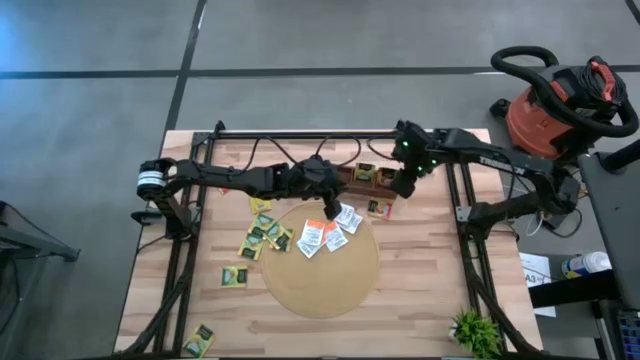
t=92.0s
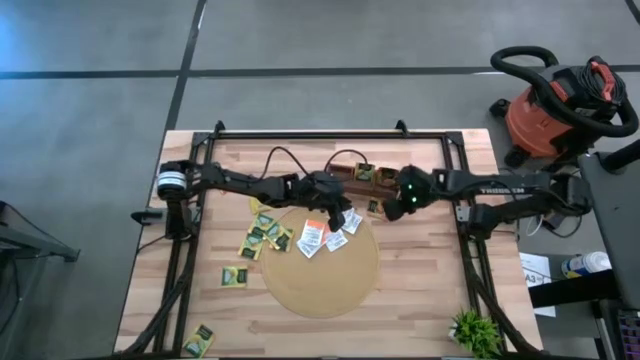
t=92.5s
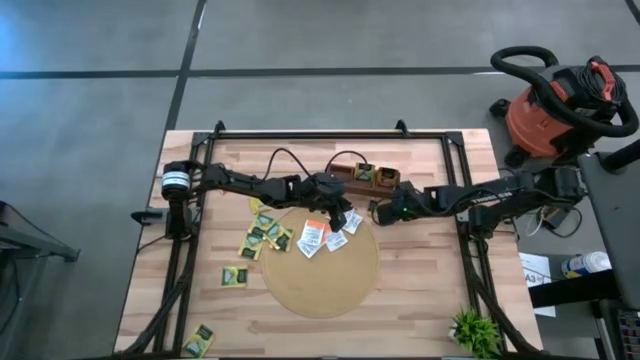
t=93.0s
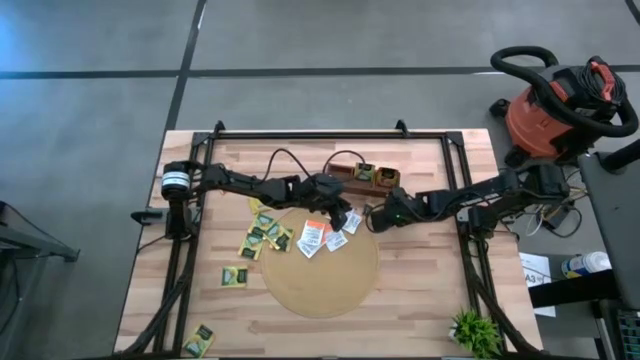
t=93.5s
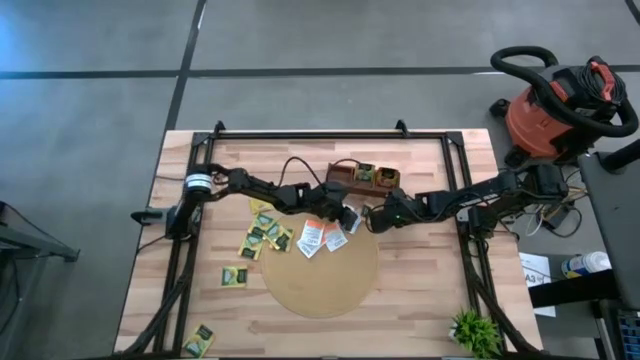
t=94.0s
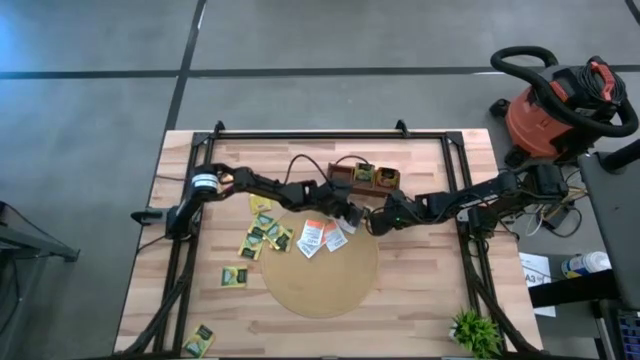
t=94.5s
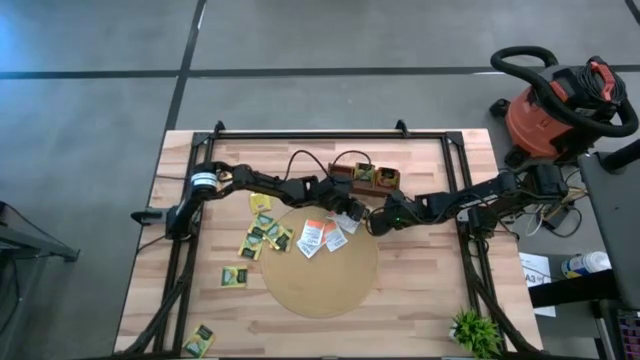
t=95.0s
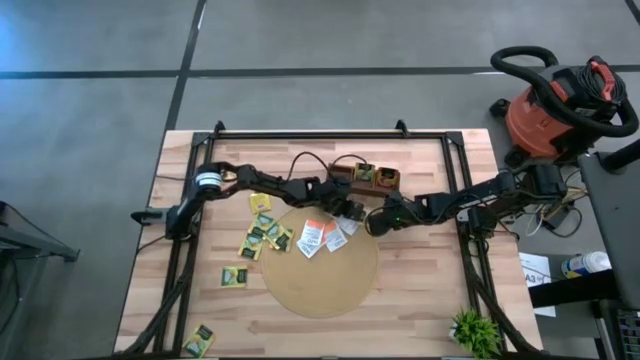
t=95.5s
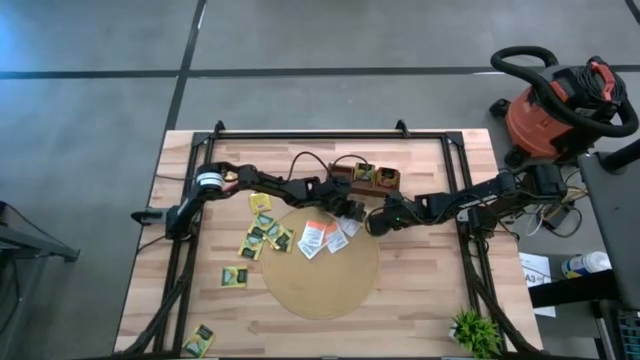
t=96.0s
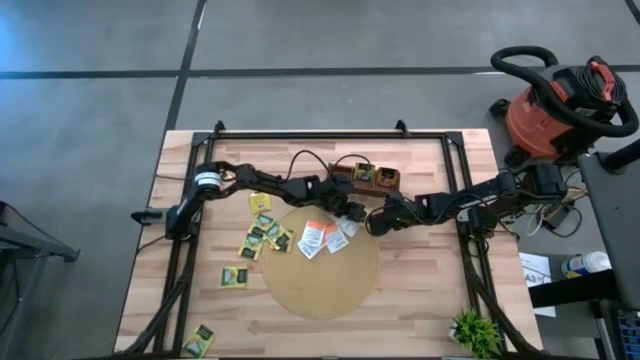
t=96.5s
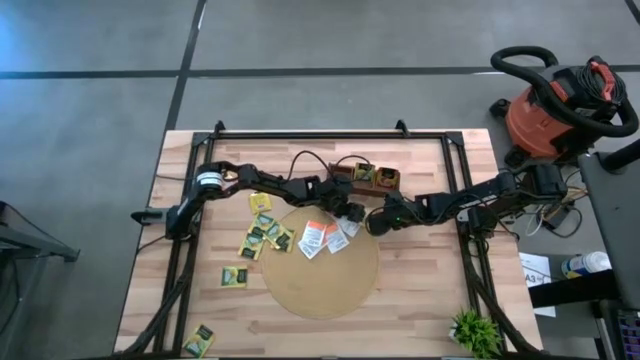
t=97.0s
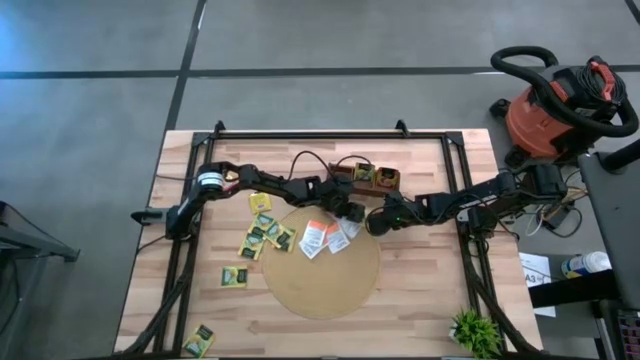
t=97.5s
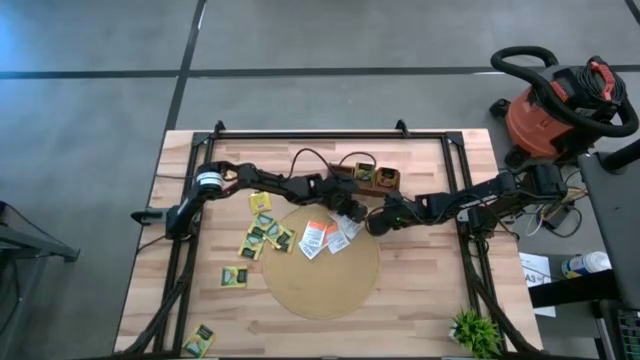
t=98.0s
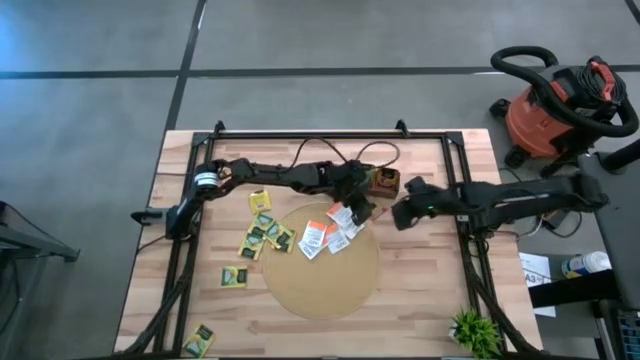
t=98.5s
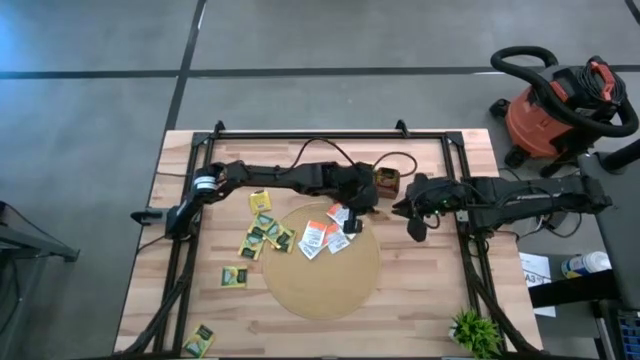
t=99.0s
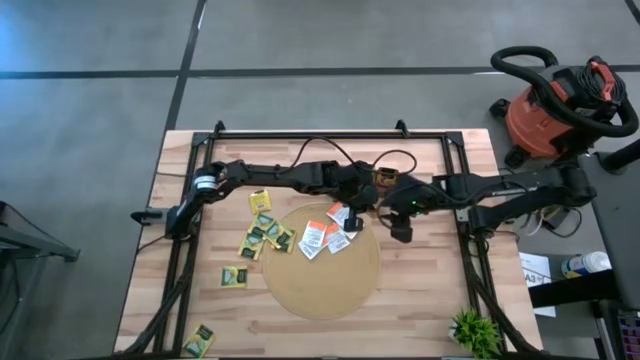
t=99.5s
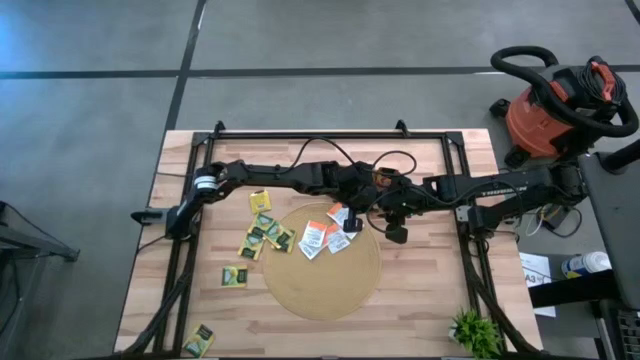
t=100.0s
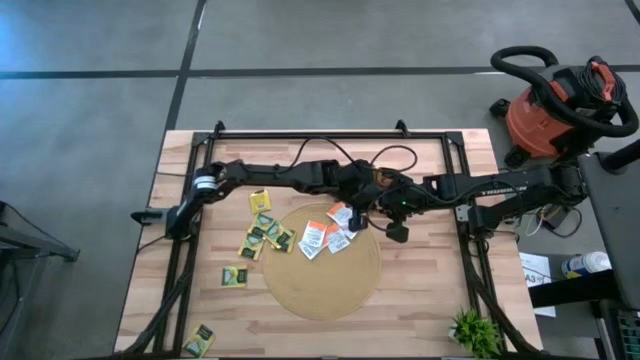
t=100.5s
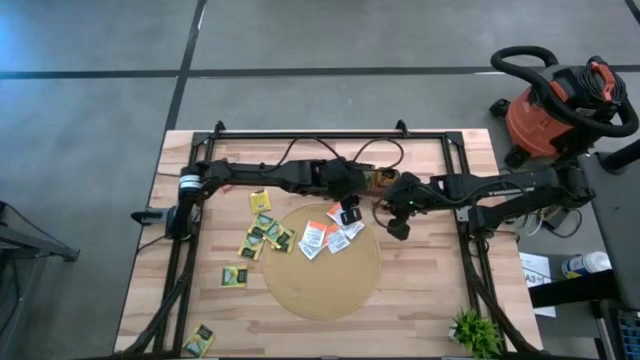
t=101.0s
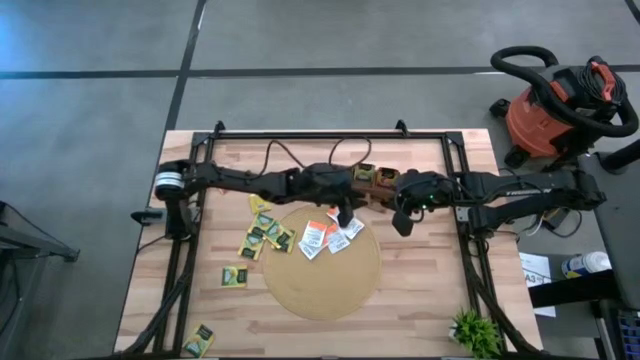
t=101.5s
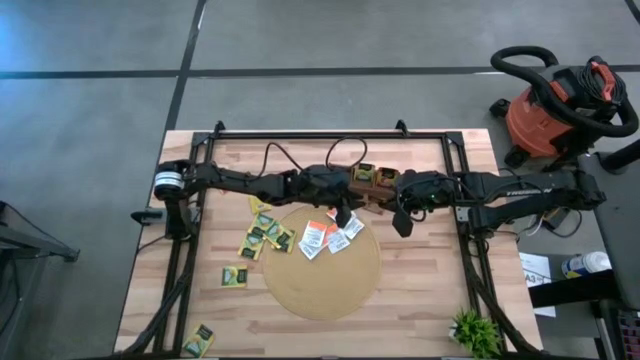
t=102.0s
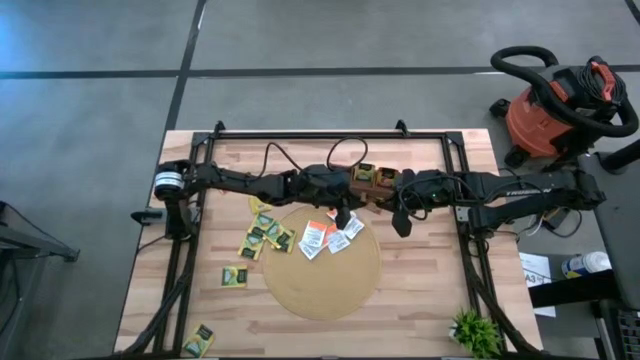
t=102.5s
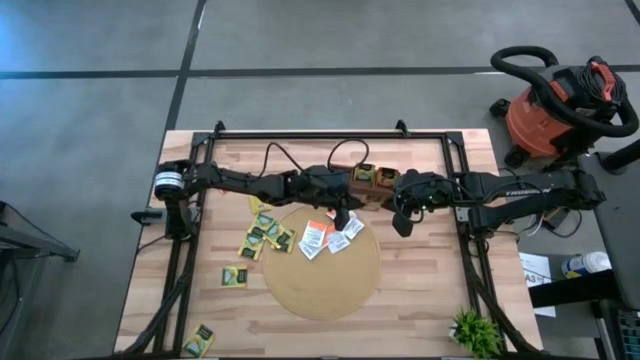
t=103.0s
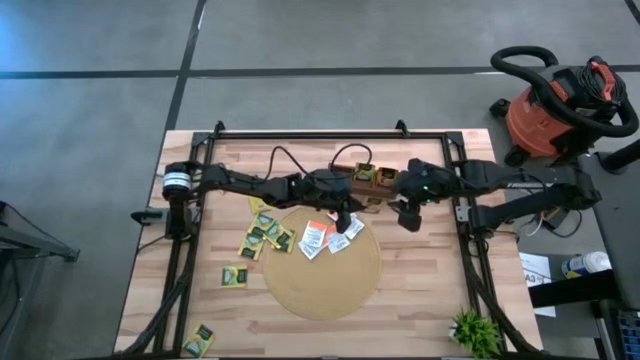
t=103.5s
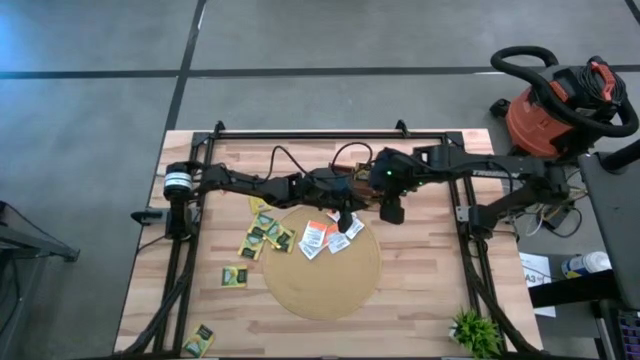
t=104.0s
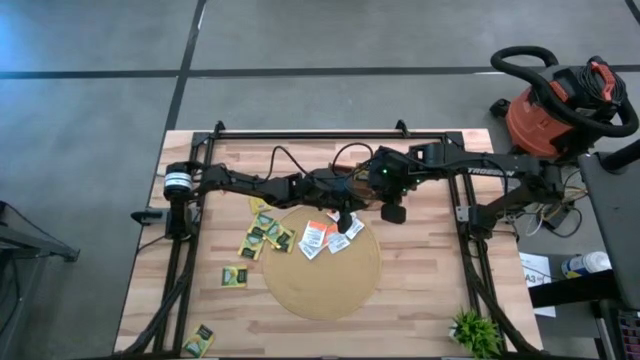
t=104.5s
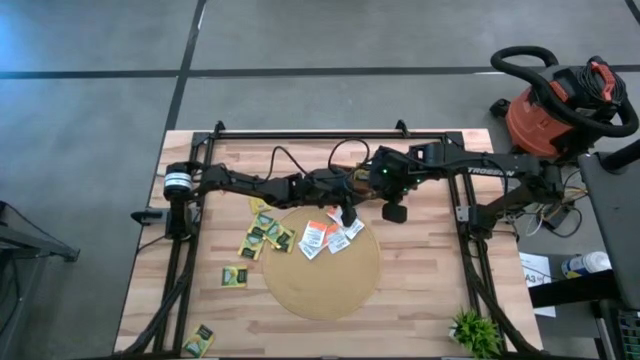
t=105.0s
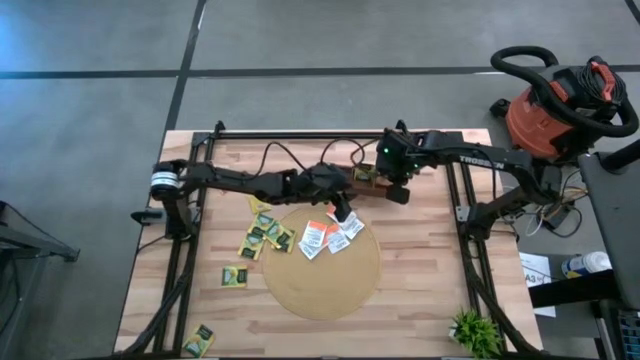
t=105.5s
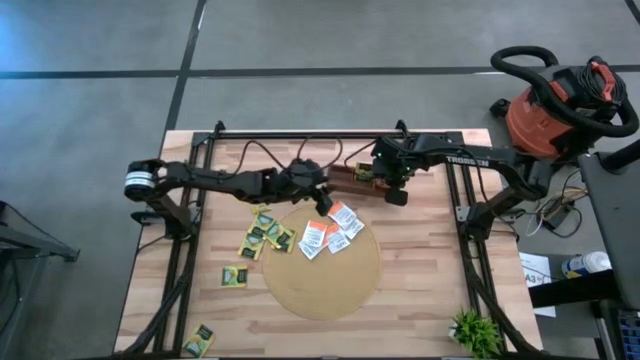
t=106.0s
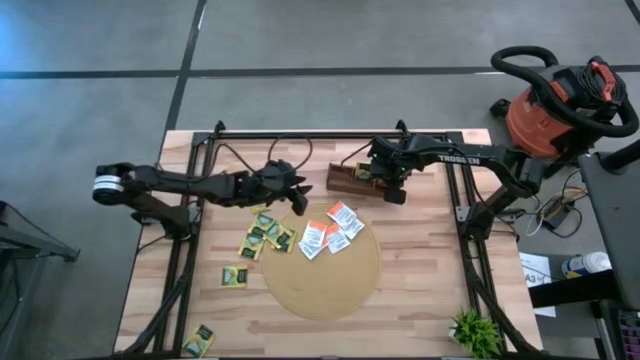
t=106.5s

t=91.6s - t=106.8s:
Task: Pick & Place Tea
Put the mango tea bag into the right section of the wooden organizer
